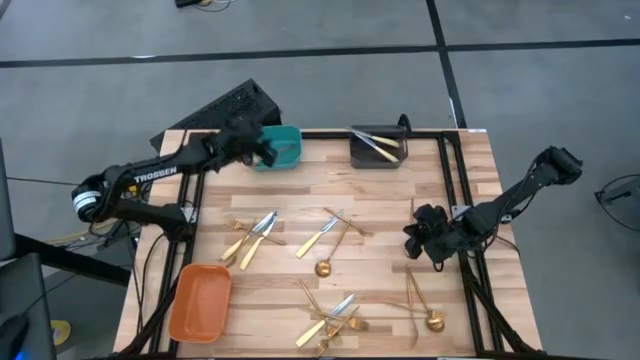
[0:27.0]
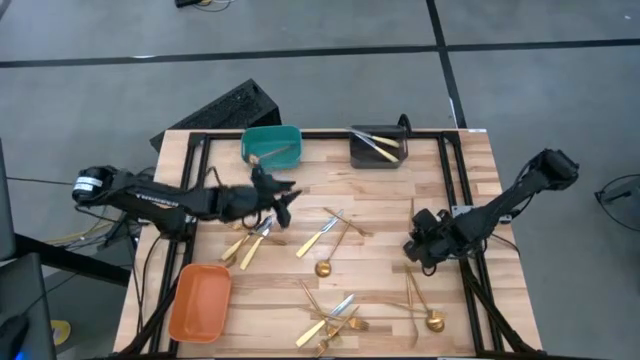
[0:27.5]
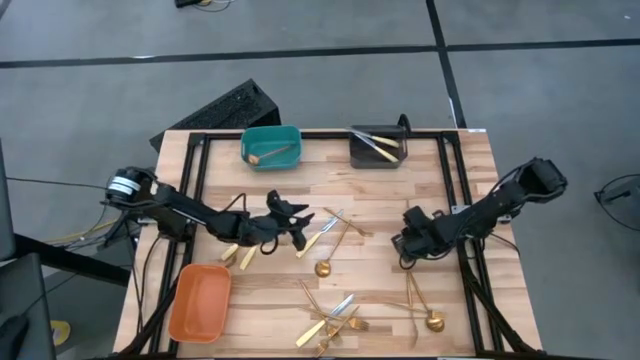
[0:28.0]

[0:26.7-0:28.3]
Task: Sort silverware by color (type)
Put the gold spoon into the green bin

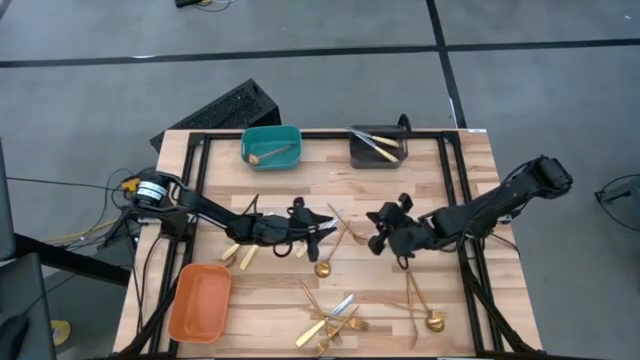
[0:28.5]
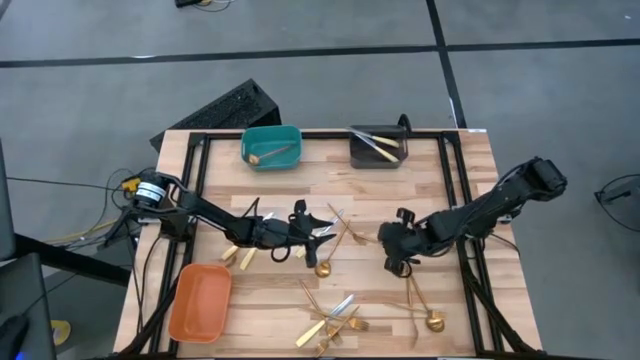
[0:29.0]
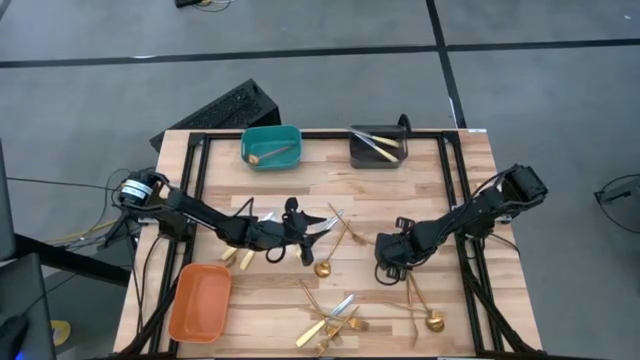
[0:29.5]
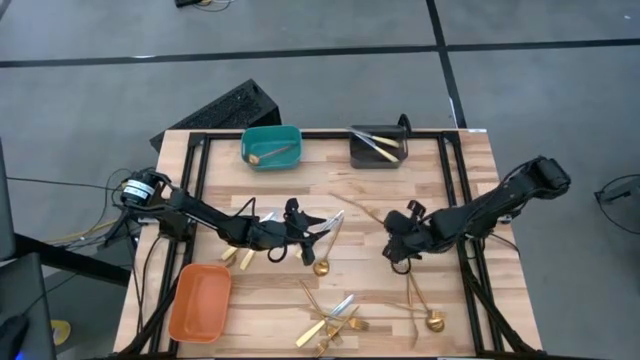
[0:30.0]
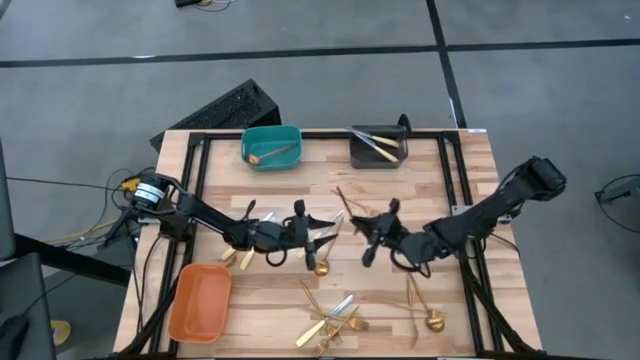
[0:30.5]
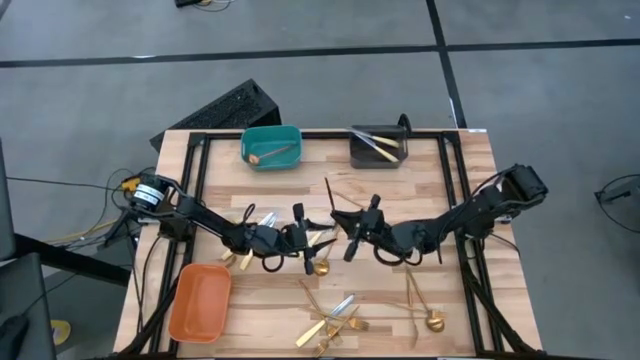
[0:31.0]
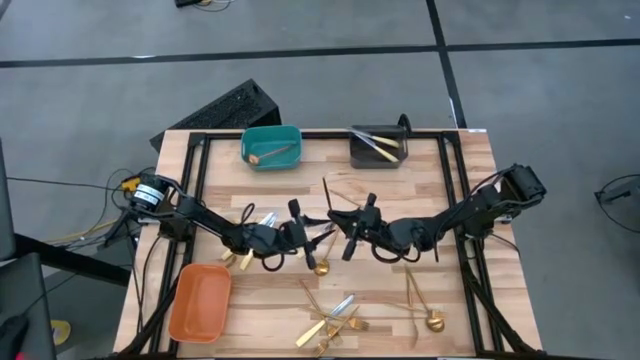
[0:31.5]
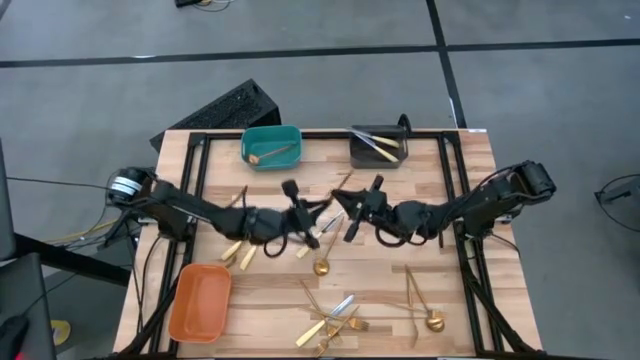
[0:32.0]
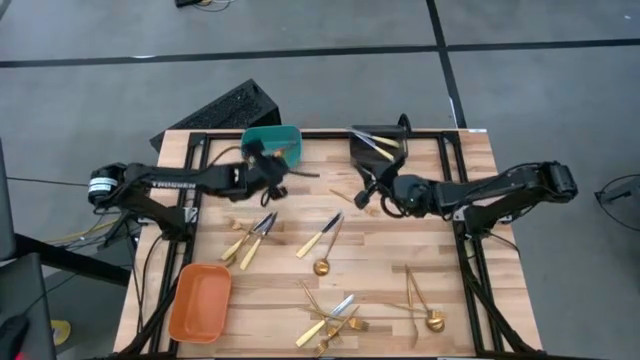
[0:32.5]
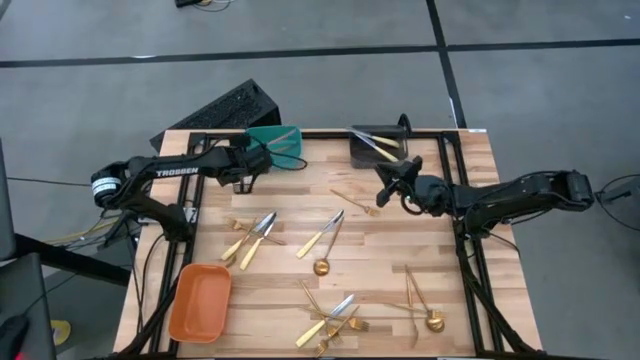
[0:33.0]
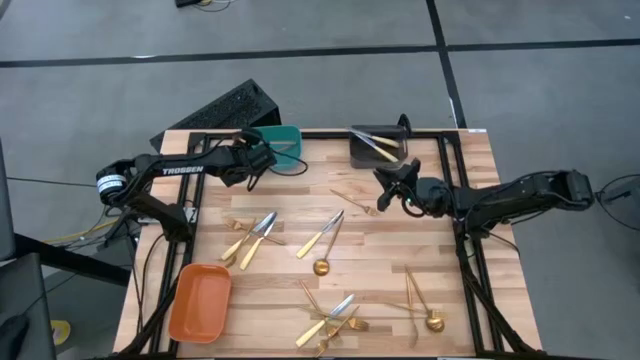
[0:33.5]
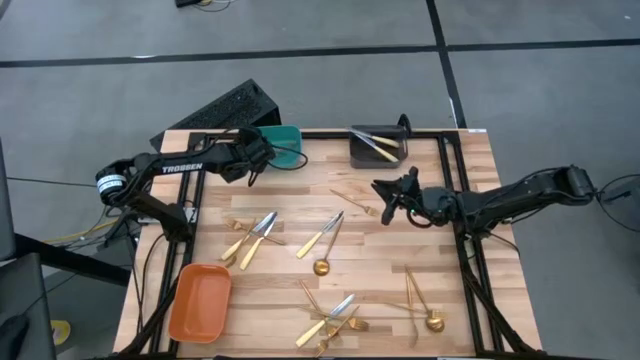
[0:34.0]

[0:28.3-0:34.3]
Put the gold spoon into the green bin

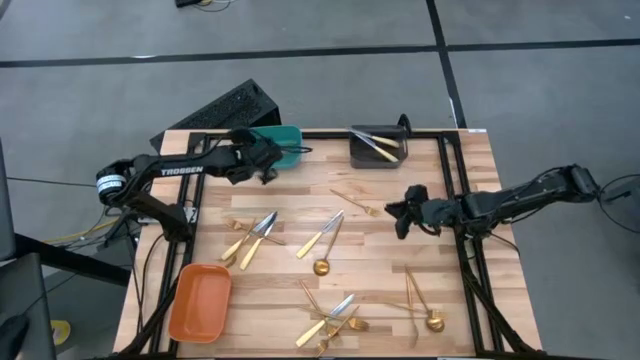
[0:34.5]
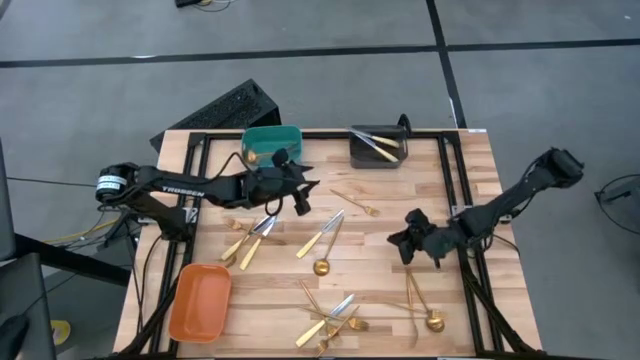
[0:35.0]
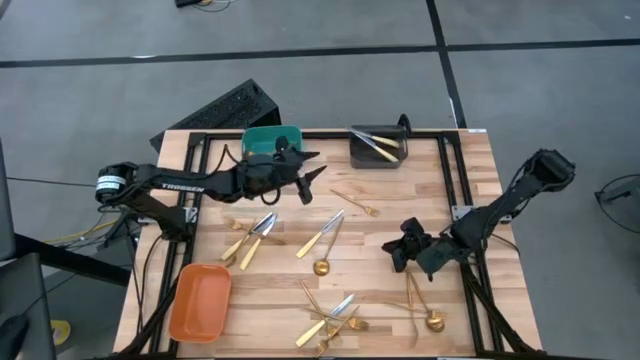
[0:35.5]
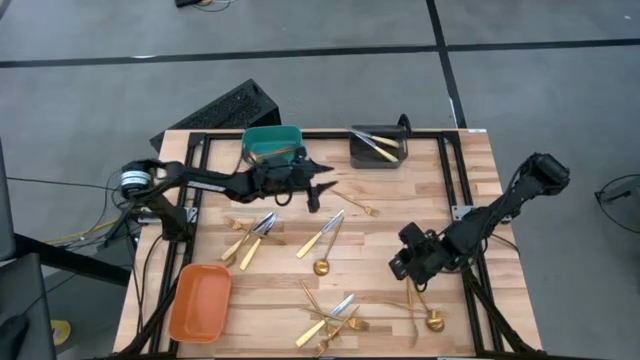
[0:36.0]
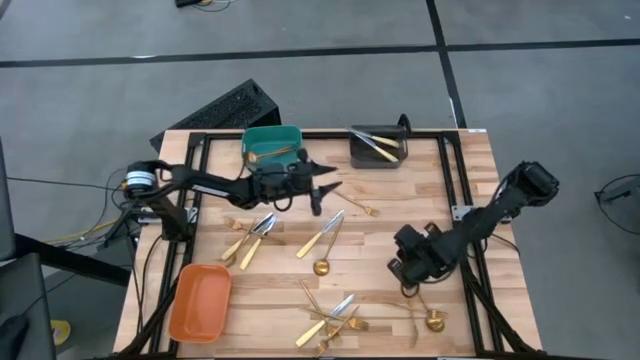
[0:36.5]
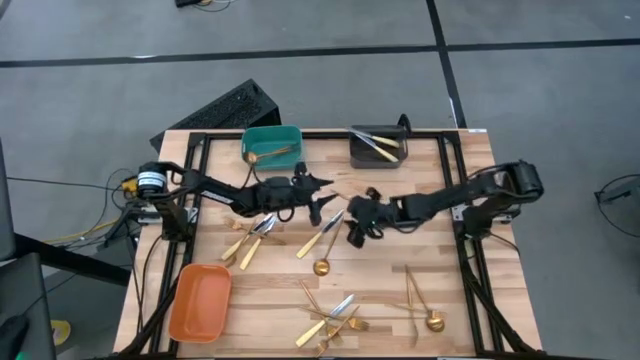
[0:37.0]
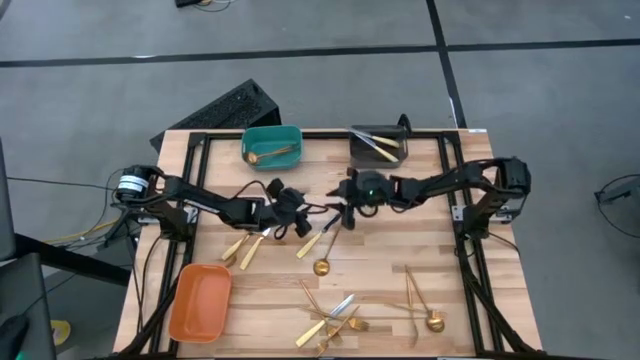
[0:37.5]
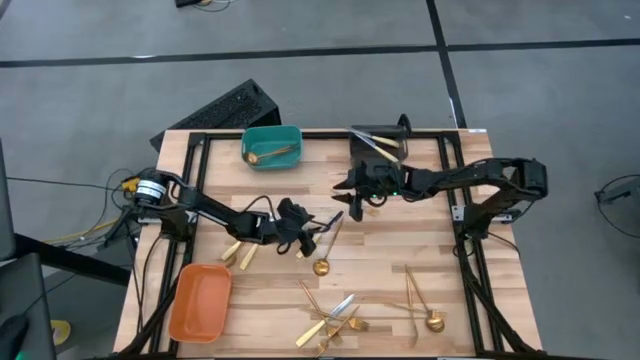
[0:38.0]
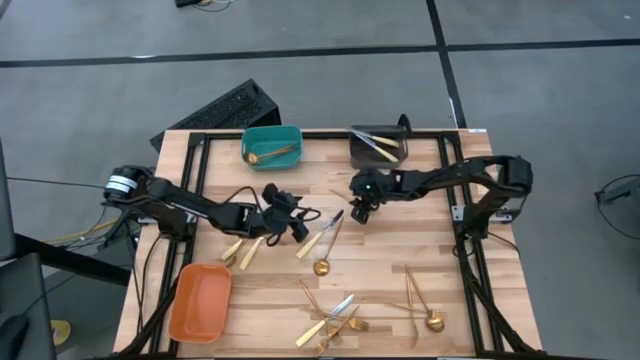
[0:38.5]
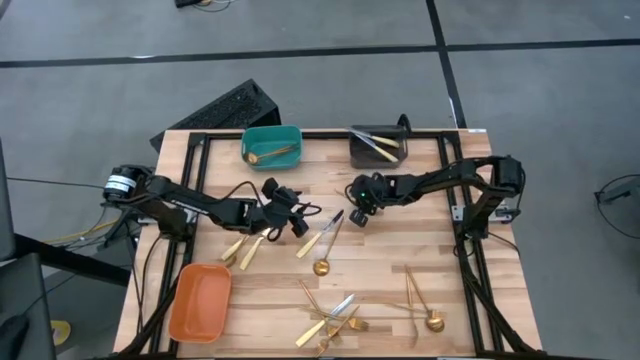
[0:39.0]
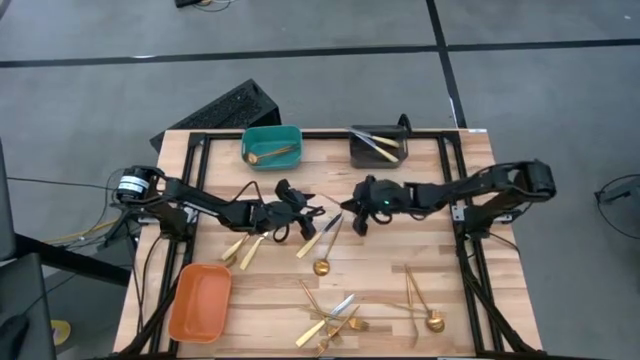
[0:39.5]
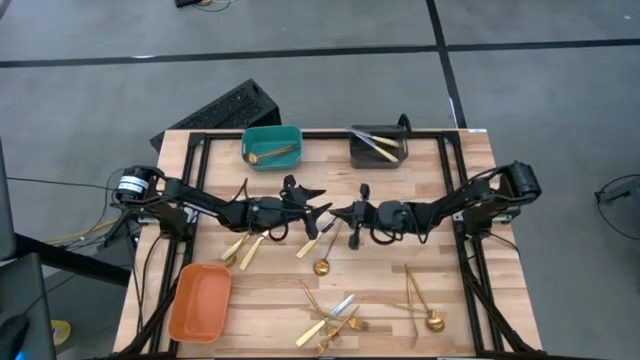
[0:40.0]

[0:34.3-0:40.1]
Put the gold fork into the orange bin

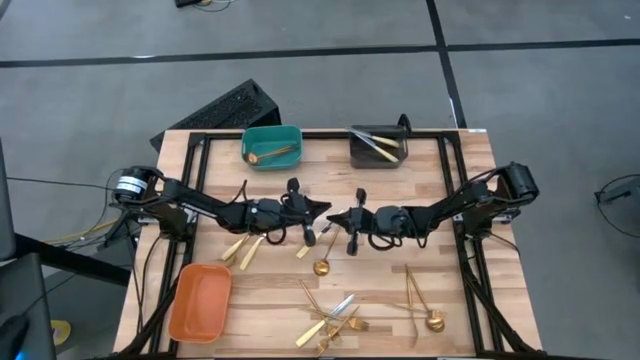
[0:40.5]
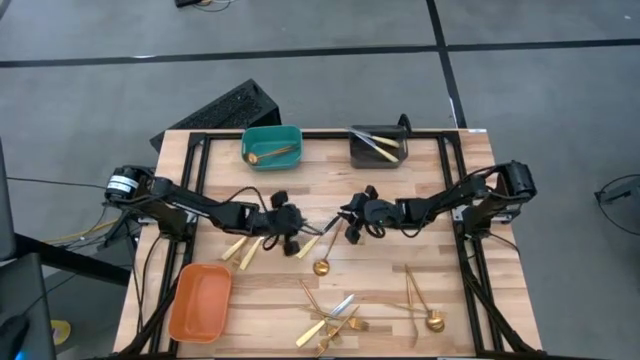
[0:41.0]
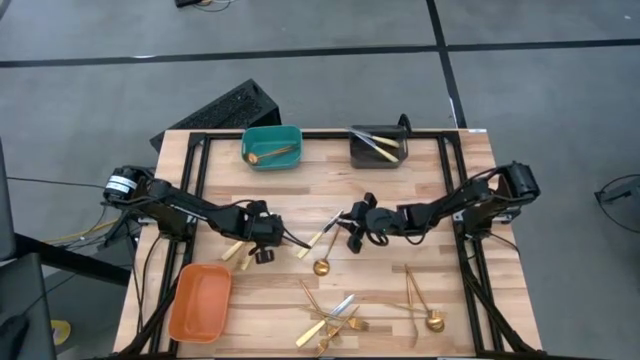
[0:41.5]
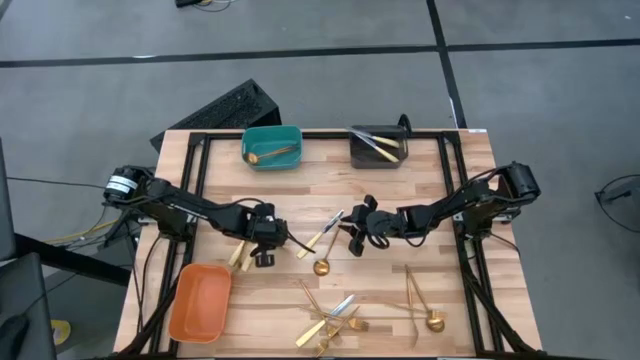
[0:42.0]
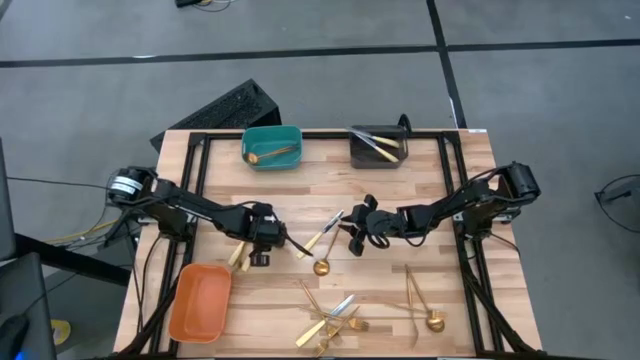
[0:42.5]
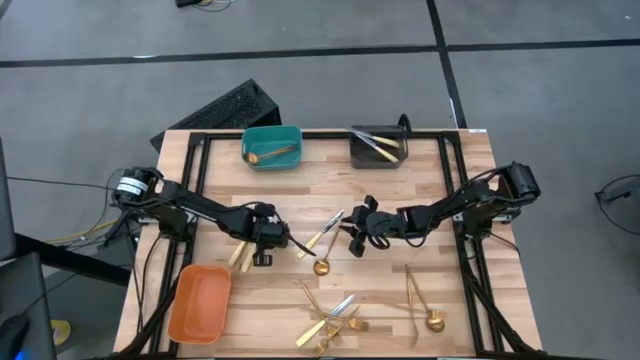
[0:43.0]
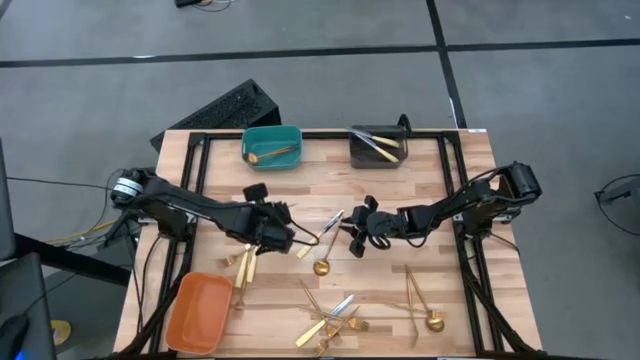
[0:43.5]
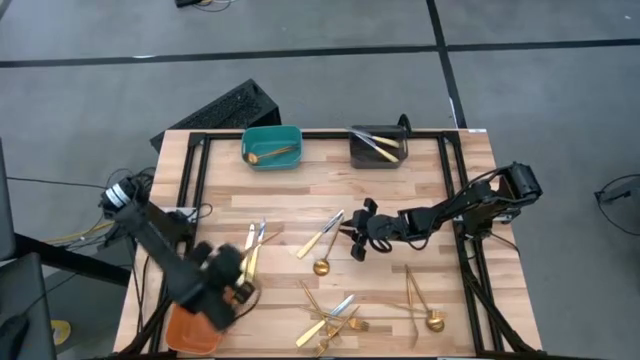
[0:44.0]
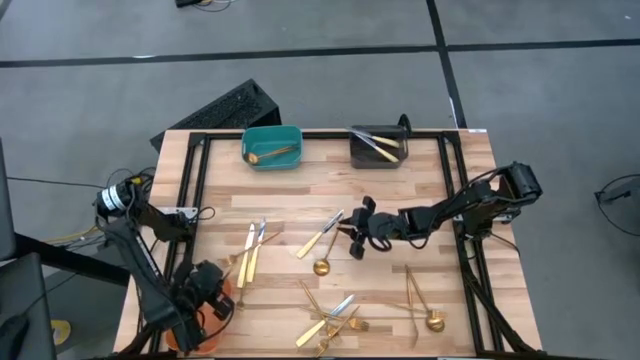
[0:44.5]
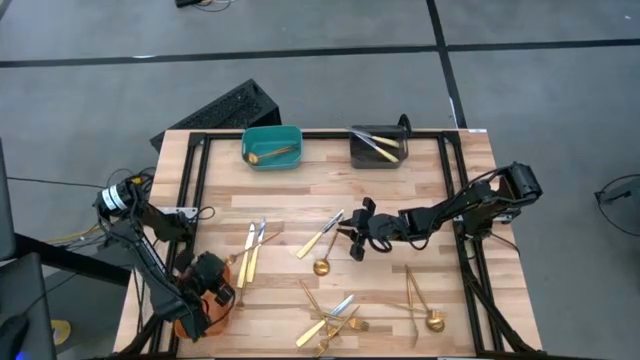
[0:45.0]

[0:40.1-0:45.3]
Put the gold fork into the orange bin

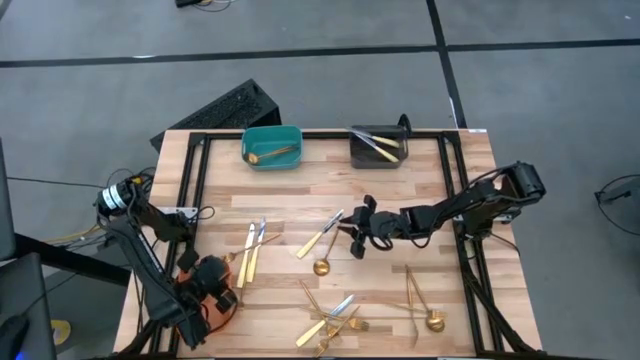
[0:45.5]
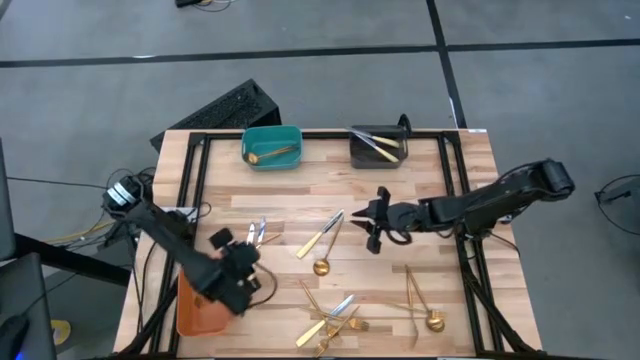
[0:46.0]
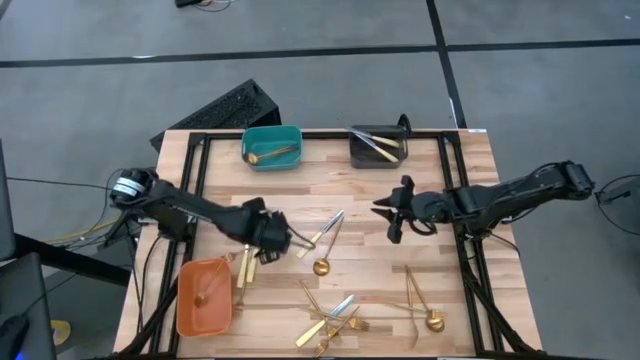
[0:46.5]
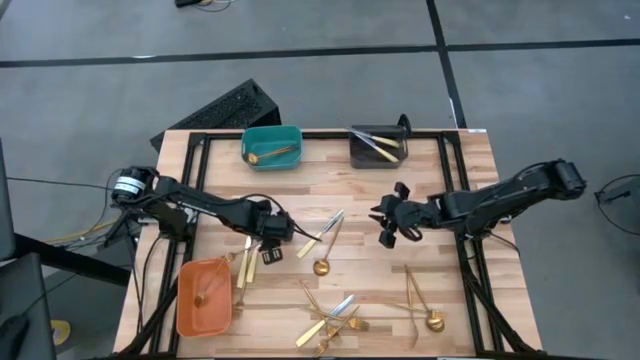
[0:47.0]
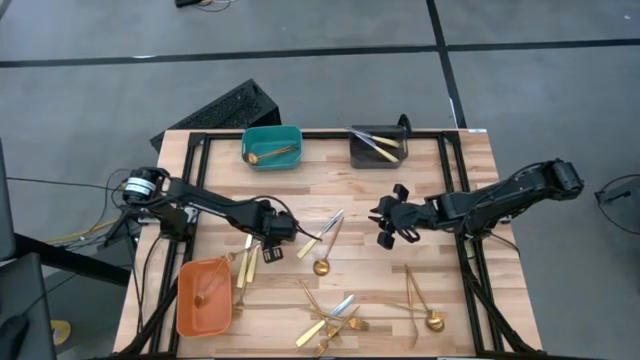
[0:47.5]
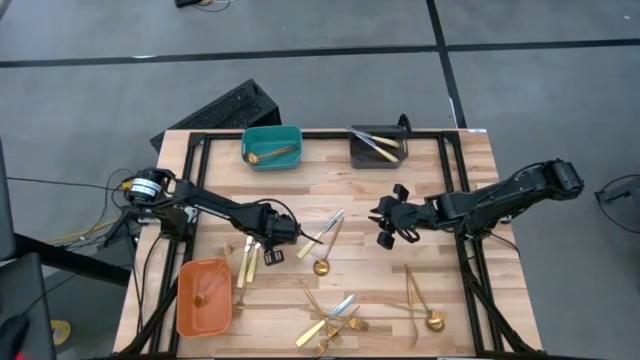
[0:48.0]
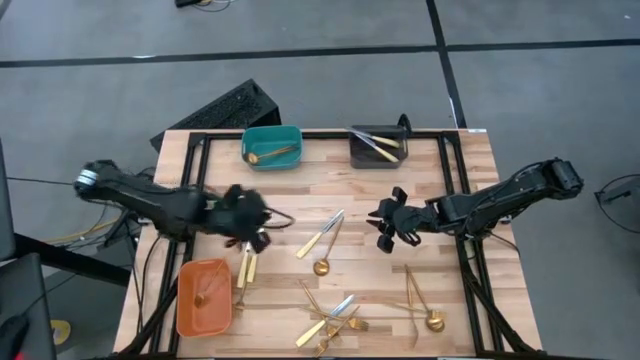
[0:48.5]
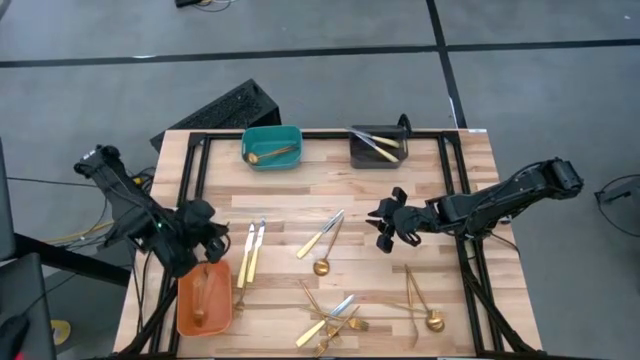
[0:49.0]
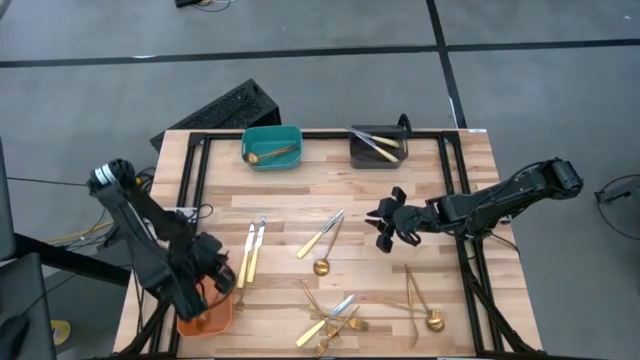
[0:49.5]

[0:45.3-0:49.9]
Put the gold fork into the orange bin
